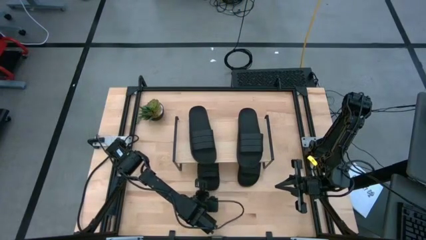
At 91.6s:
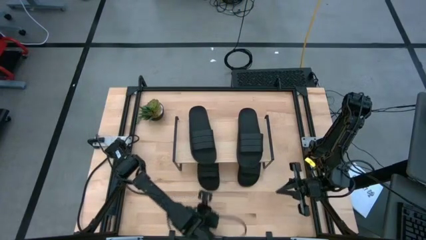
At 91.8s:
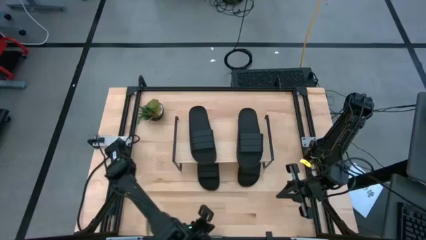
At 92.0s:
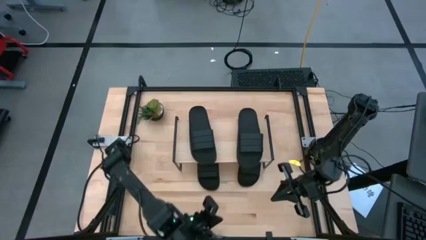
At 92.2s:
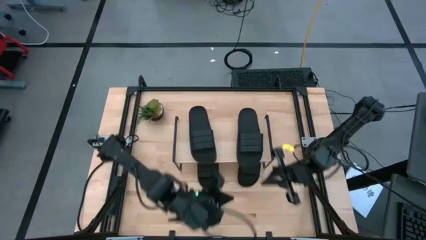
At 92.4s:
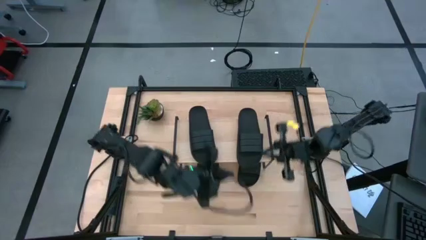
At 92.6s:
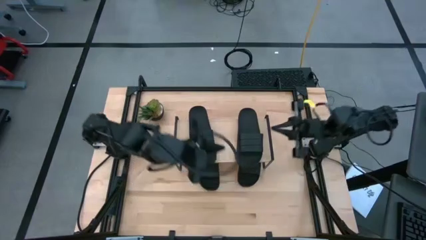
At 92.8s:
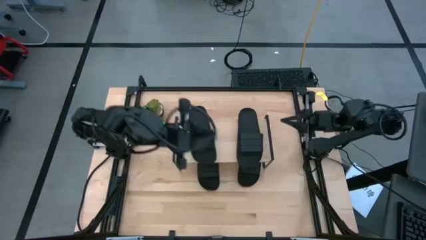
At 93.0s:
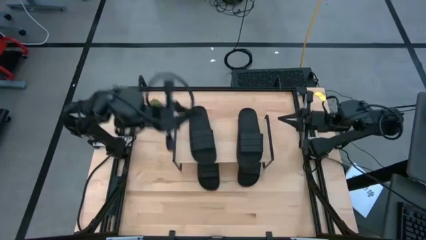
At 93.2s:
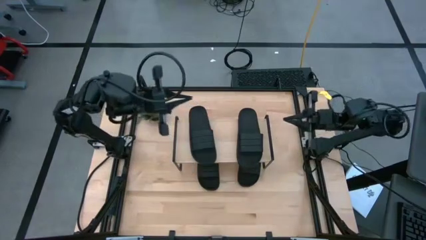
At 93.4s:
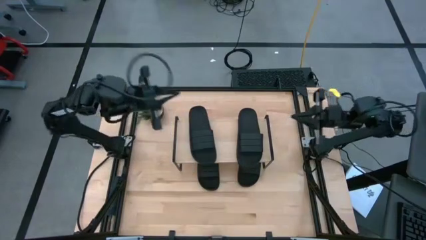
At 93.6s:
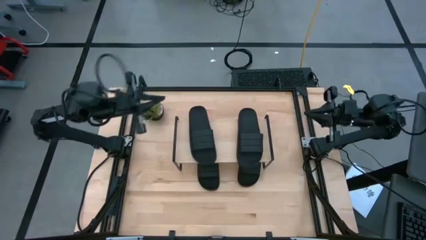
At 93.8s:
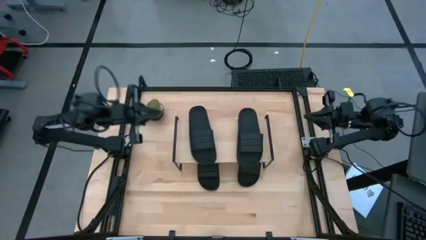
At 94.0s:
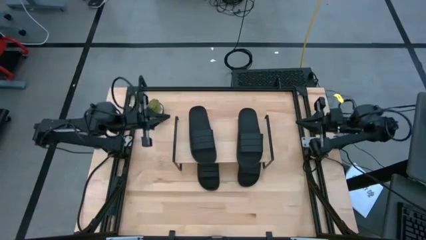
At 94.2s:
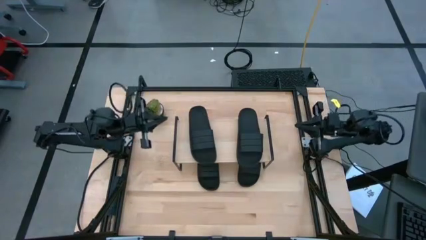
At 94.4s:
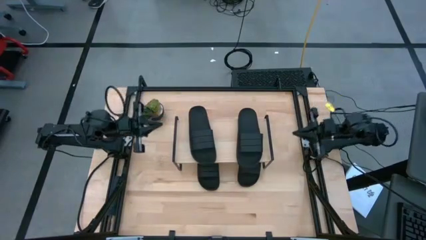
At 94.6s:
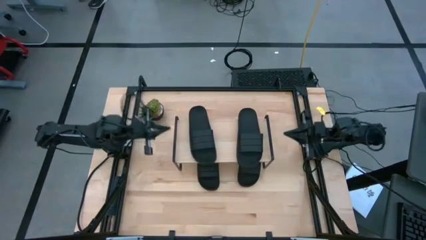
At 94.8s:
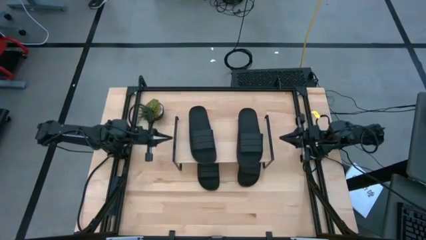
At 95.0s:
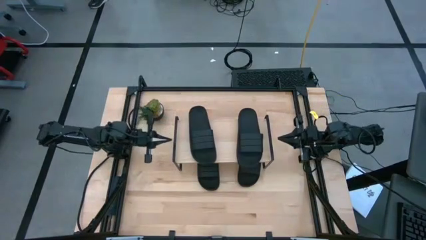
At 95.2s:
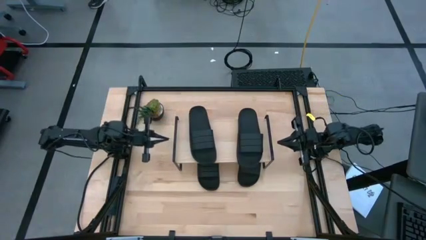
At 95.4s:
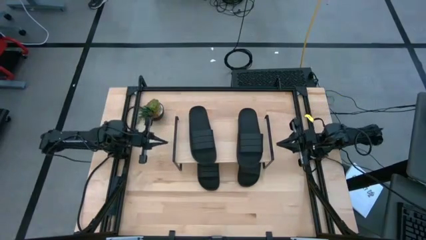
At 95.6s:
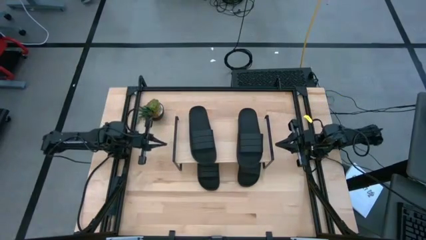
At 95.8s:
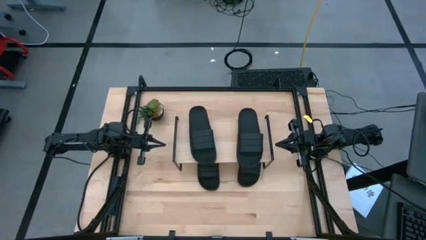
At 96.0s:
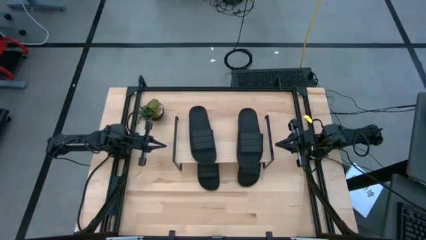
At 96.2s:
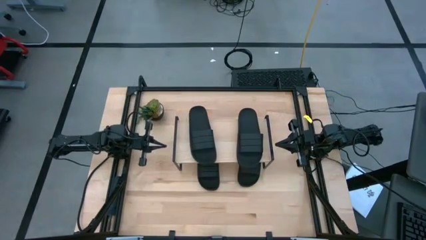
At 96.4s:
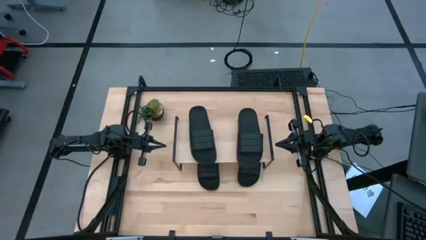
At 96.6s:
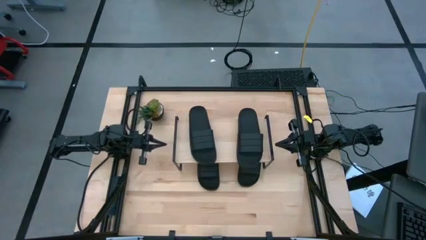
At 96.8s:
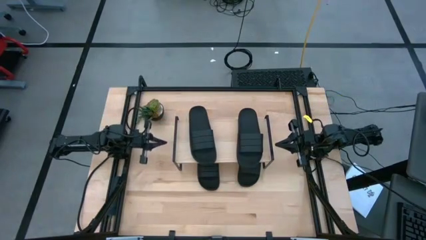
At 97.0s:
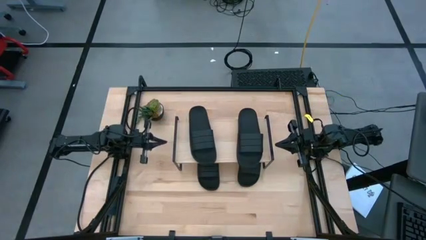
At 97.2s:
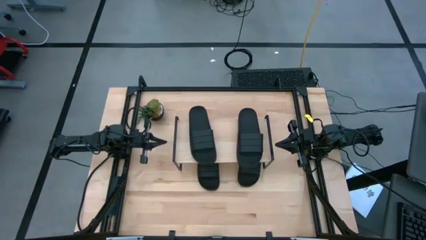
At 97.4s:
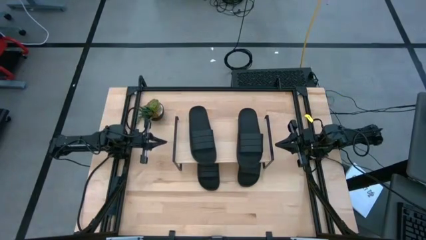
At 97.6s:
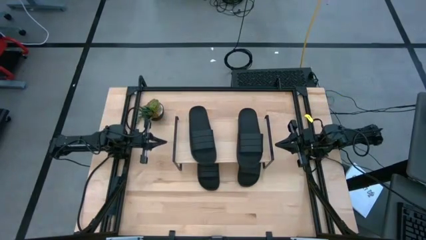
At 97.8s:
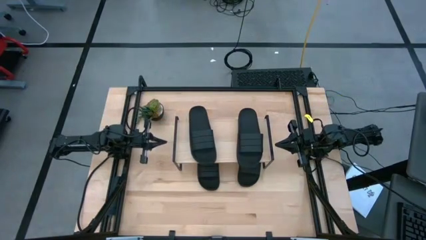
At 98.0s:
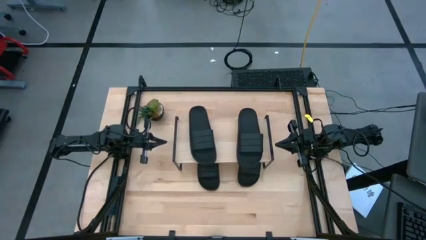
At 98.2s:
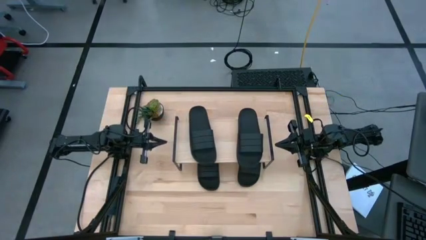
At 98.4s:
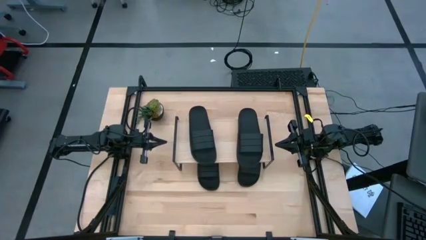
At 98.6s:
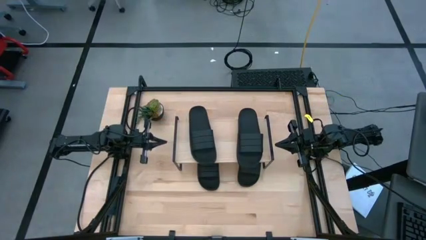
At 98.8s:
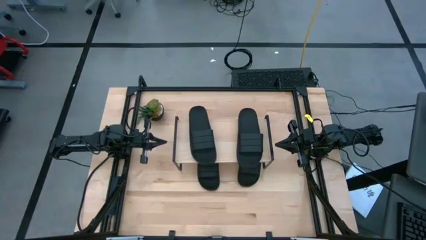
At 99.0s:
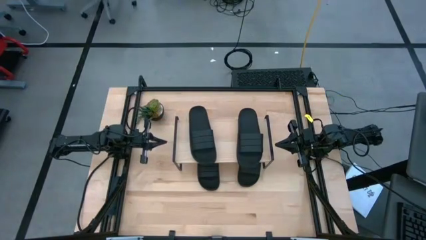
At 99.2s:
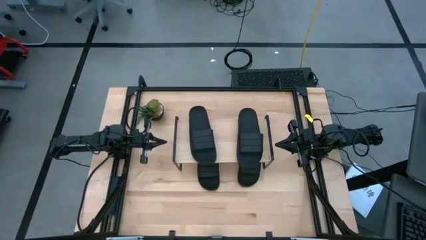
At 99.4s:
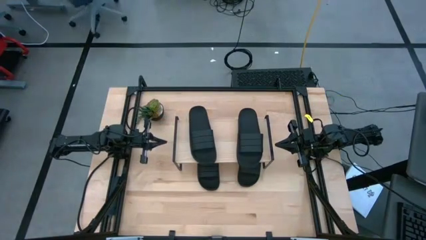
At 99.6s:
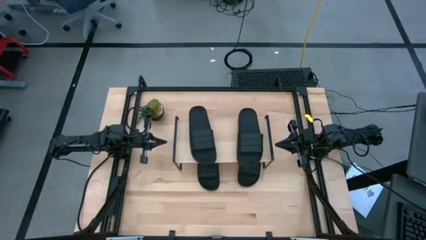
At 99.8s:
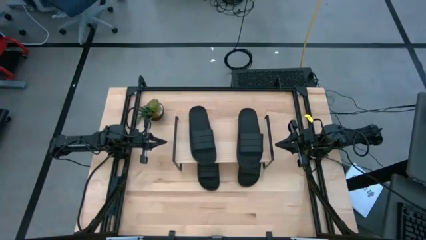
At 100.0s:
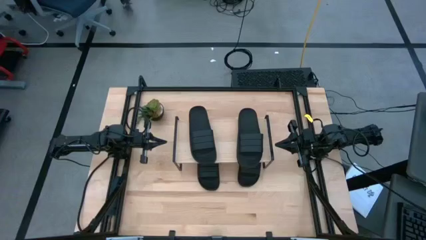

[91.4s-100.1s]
Task: Pick and place slides into the shelf
Return to Home Position

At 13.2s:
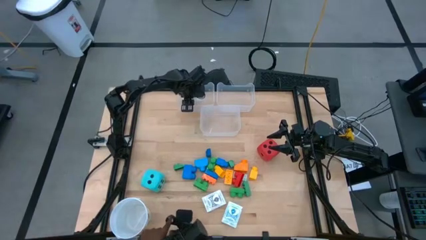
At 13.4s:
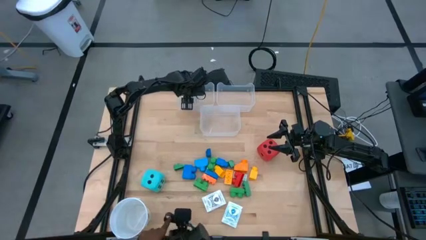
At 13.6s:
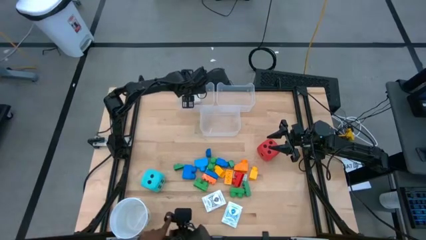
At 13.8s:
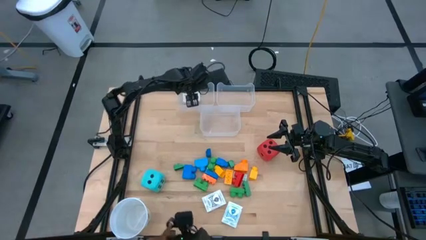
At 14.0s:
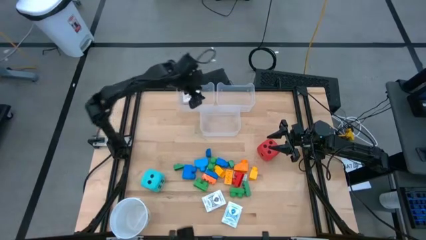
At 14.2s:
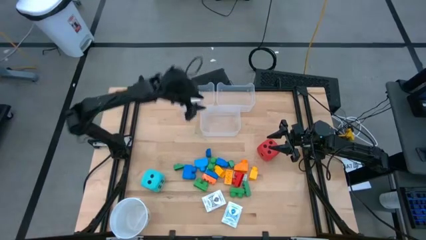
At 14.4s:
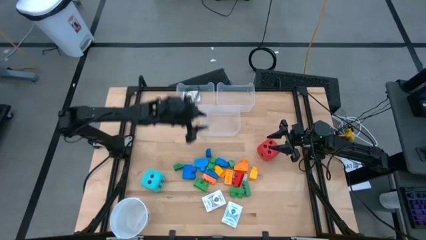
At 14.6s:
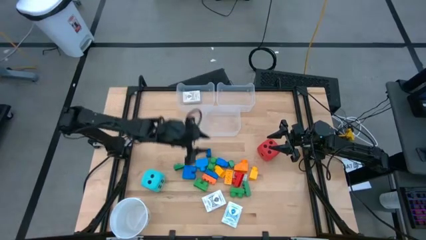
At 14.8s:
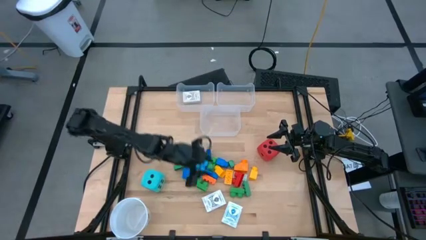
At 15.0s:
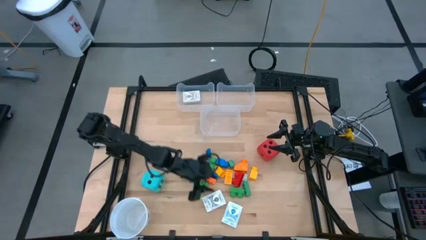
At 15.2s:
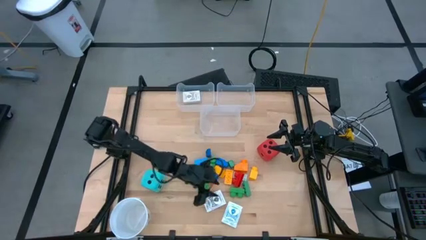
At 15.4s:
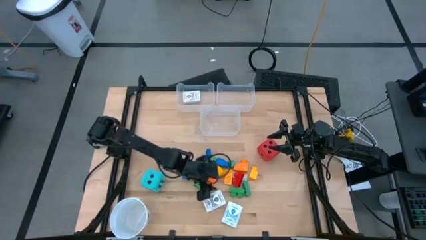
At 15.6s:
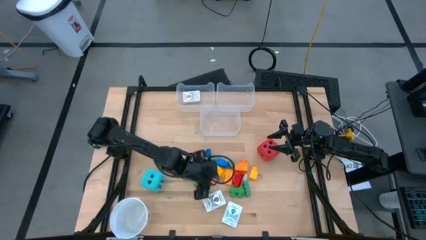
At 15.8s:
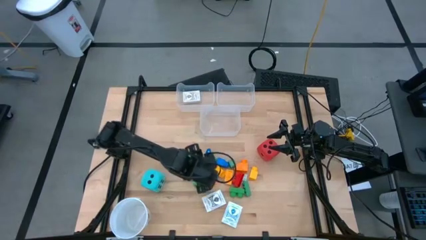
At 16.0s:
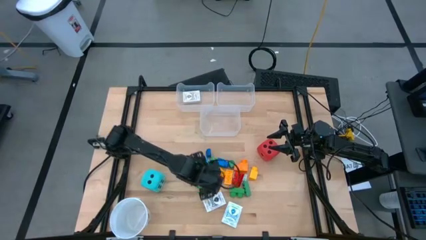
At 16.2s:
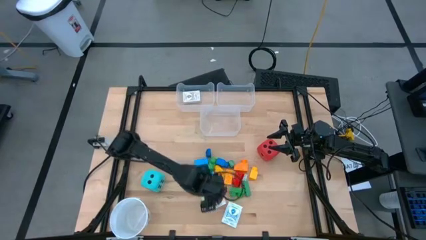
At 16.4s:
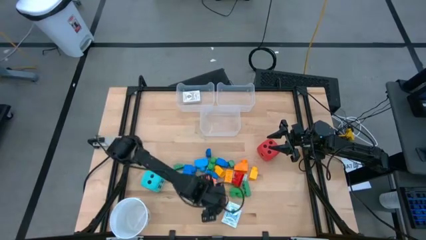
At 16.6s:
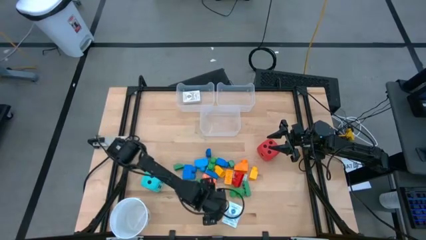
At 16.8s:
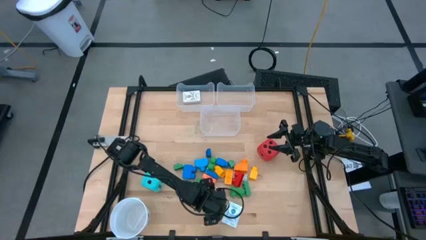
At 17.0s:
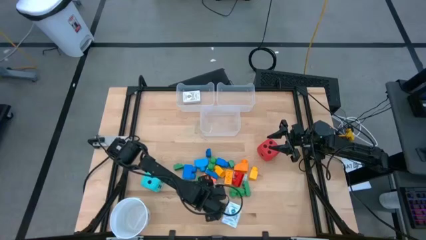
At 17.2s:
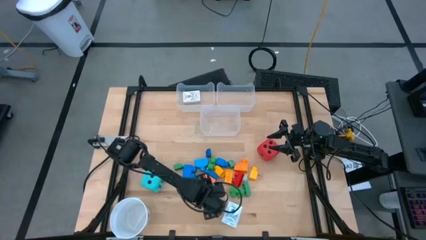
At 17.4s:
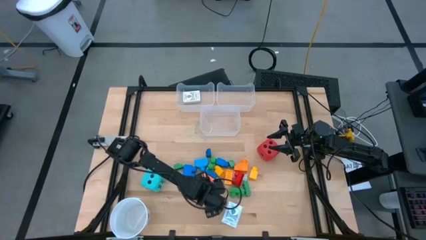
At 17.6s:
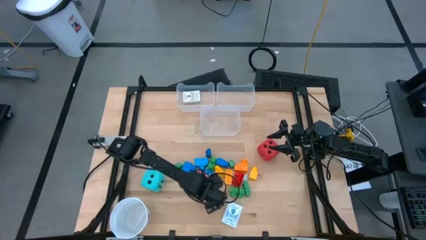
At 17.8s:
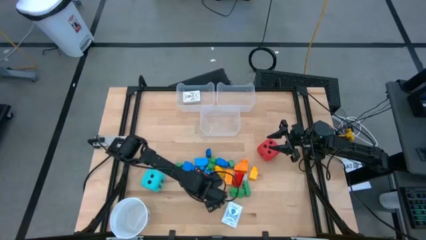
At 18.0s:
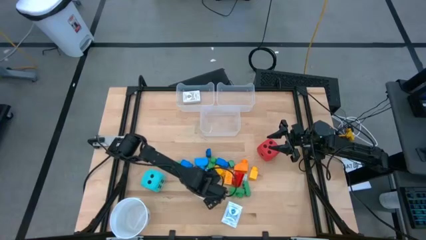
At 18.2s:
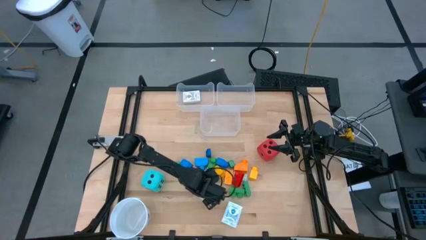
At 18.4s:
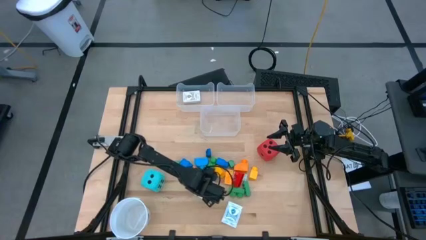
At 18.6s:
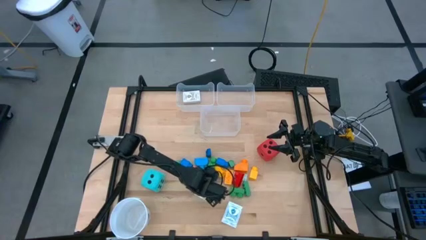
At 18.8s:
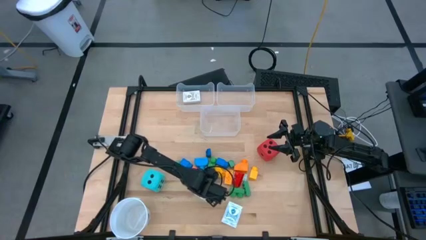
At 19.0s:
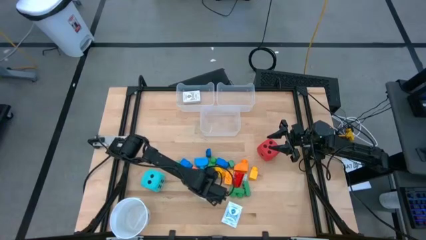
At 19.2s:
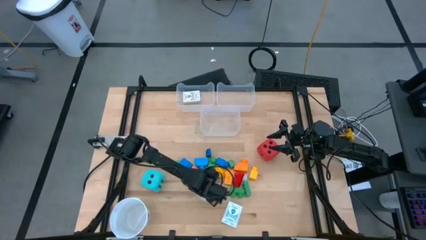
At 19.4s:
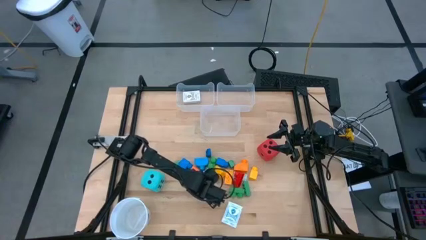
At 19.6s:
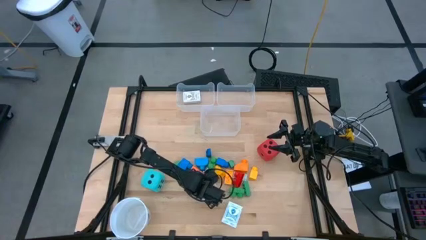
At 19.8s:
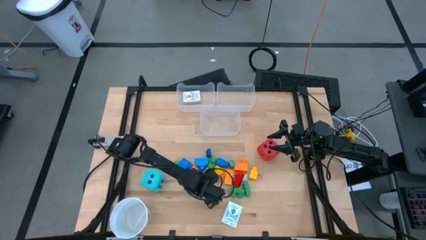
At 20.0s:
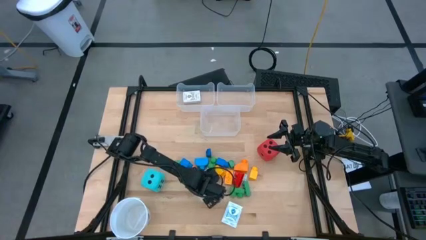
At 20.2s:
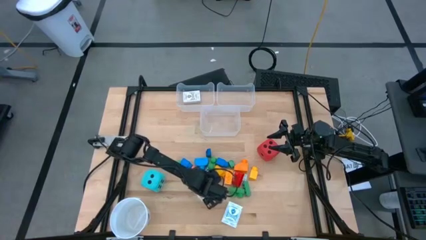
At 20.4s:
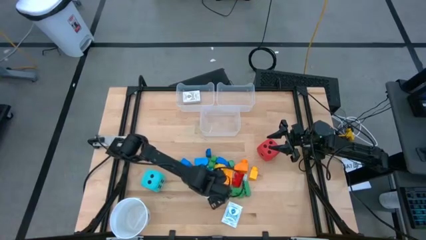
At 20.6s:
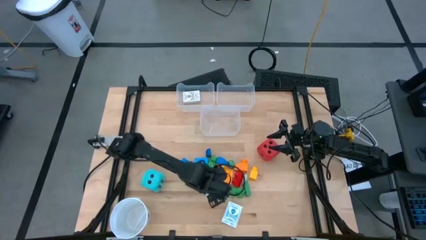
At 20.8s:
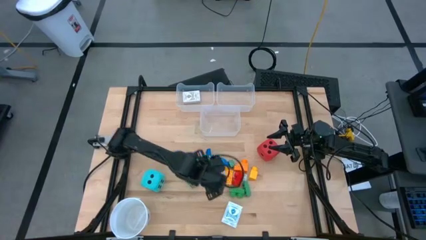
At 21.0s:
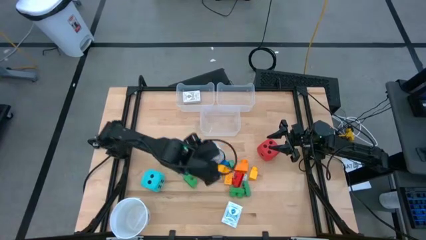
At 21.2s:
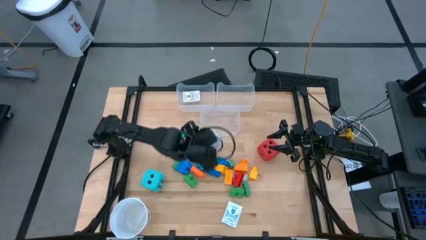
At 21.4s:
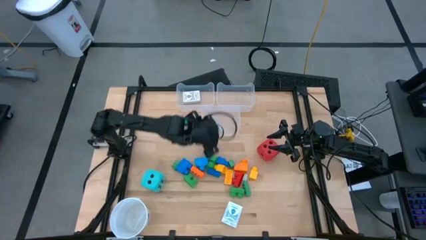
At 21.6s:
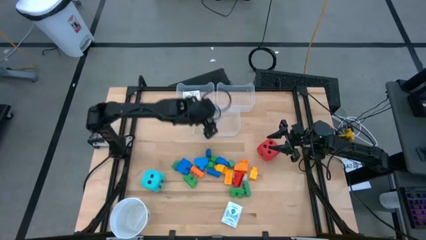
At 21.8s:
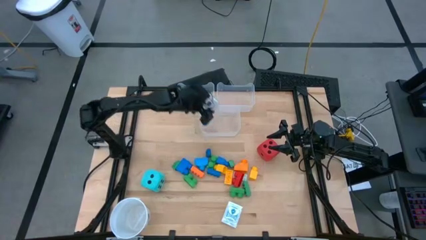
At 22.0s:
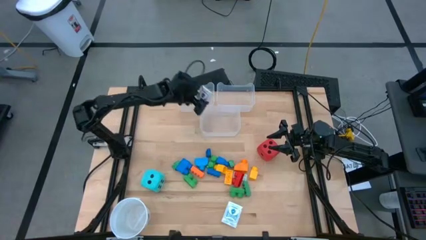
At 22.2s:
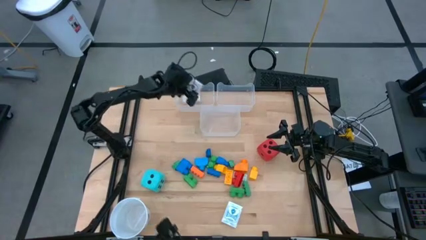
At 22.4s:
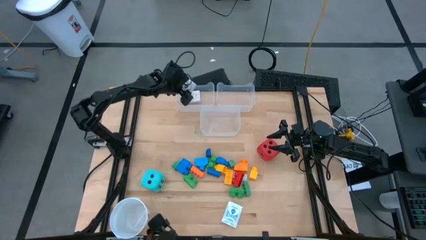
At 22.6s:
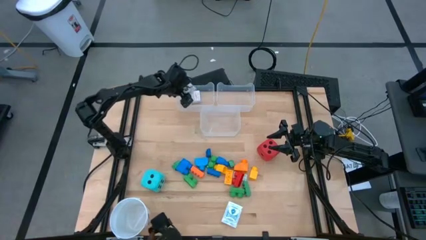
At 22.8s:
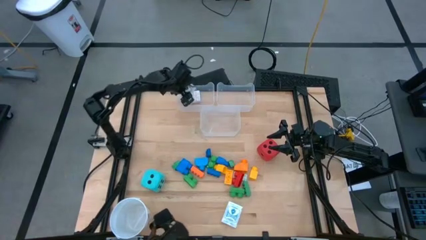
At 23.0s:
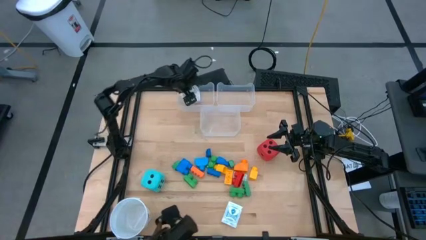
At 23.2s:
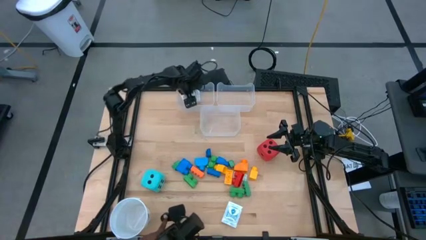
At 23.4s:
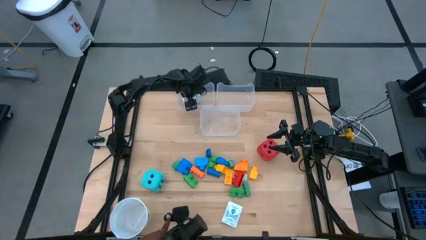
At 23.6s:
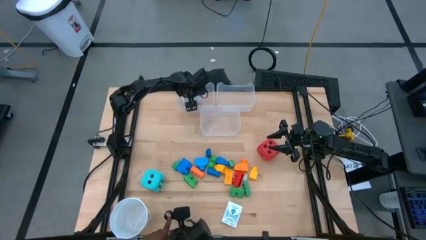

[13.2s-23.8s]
Task: Pick & Place Toys
Put the black deck of cards into the top left transparent bin
